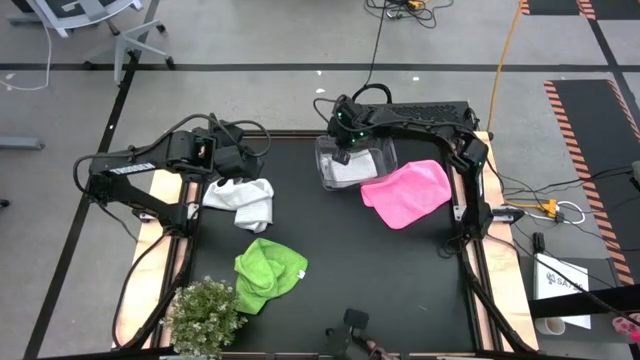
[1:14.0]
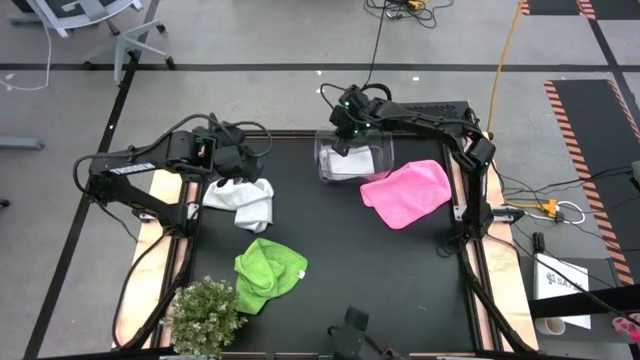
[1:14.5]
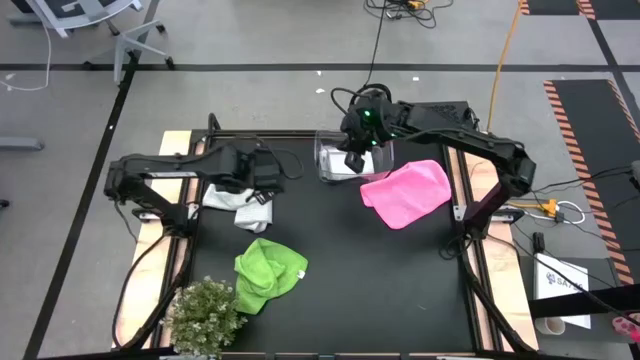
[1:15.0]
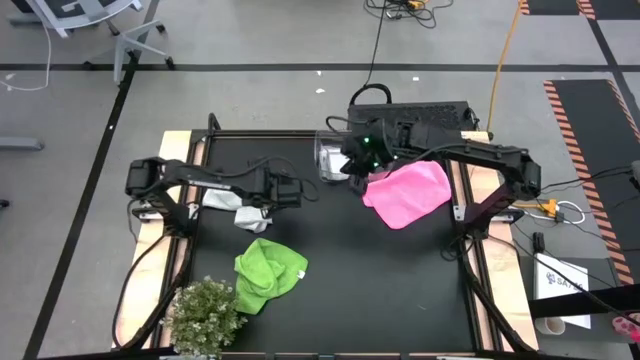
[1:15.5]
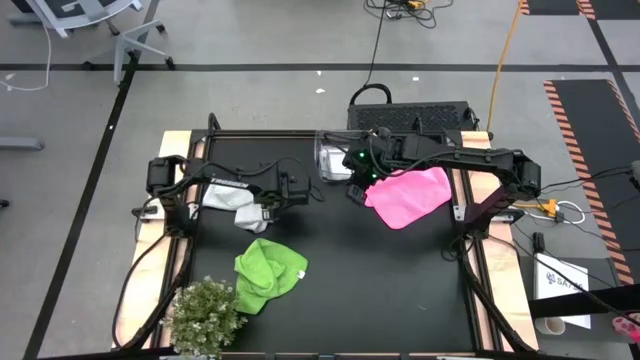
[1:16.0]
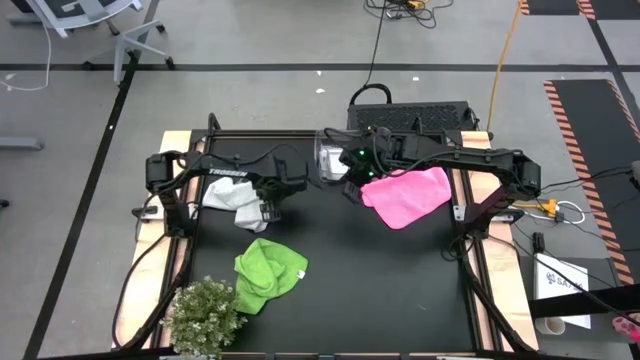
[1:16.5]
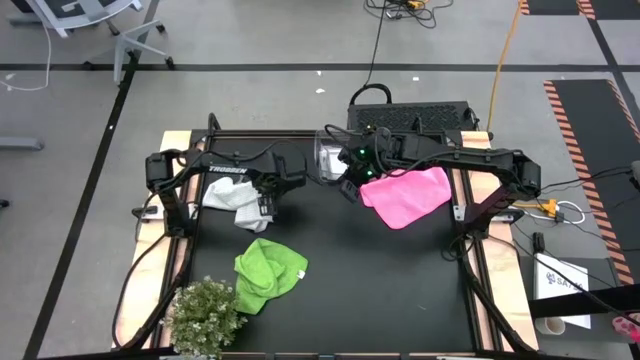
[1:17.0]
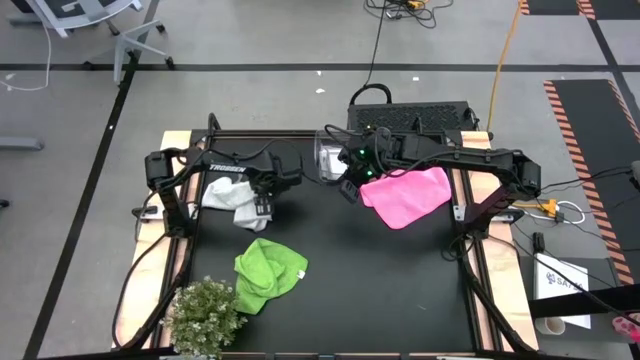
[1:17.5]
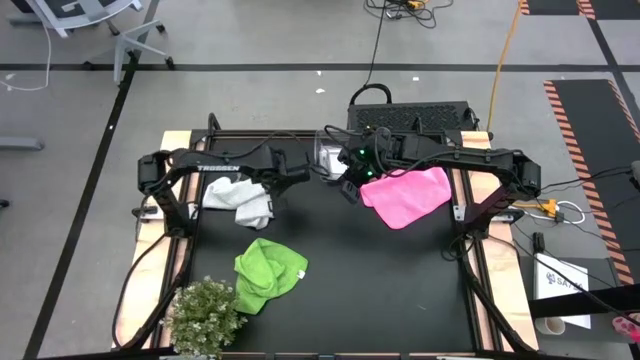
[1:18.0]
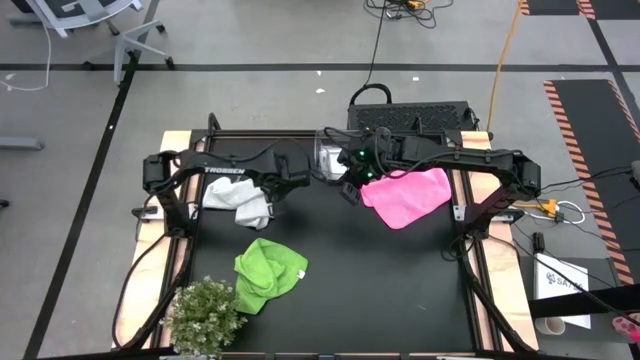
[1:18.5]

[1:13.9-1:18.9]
Task: Fold microfiber towels
Fold the gray microfiber cloth

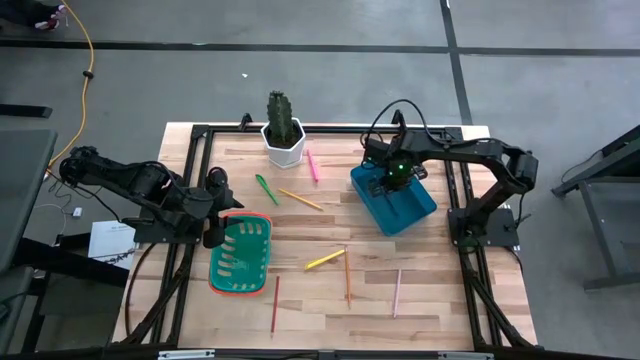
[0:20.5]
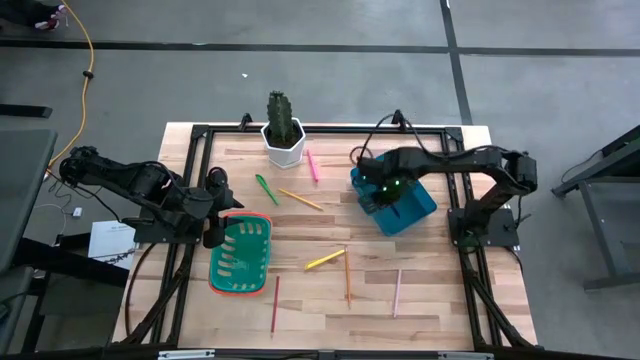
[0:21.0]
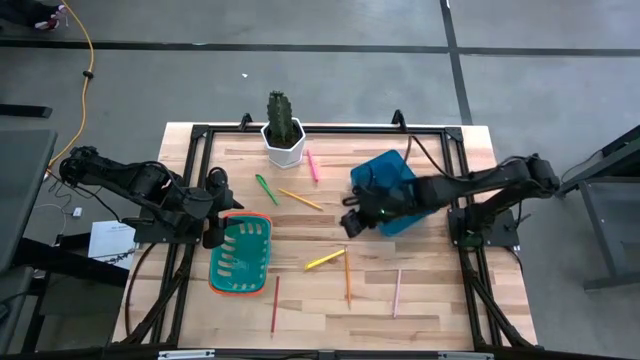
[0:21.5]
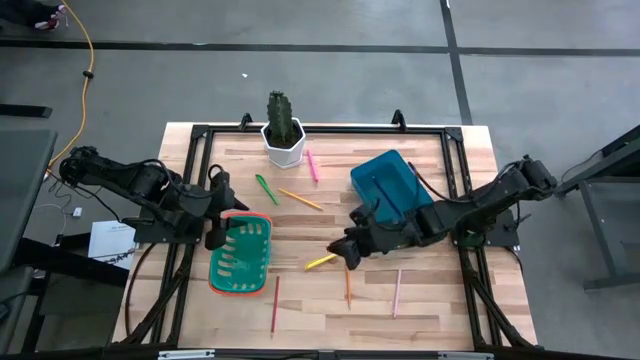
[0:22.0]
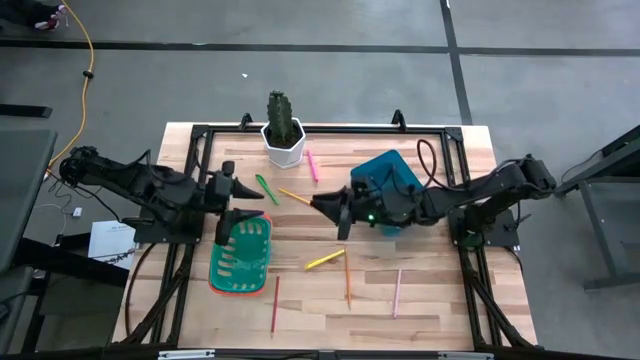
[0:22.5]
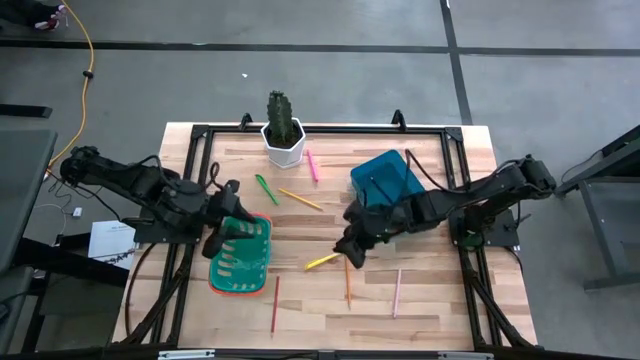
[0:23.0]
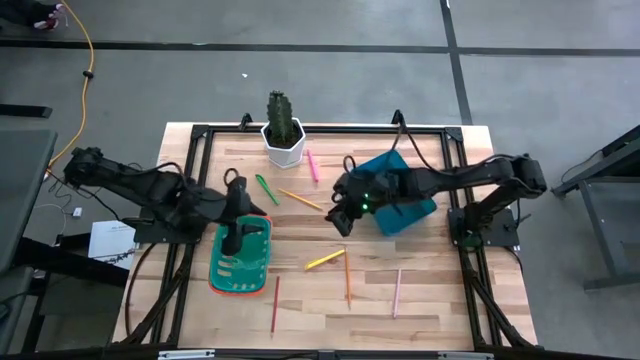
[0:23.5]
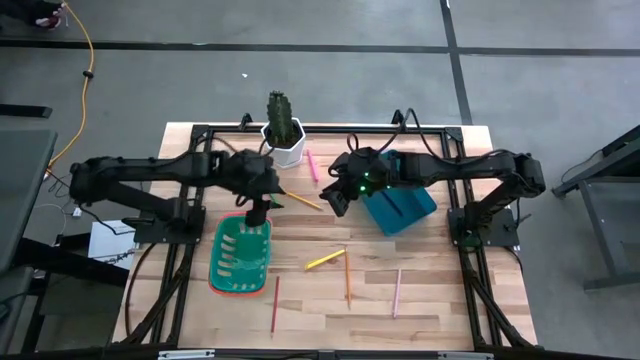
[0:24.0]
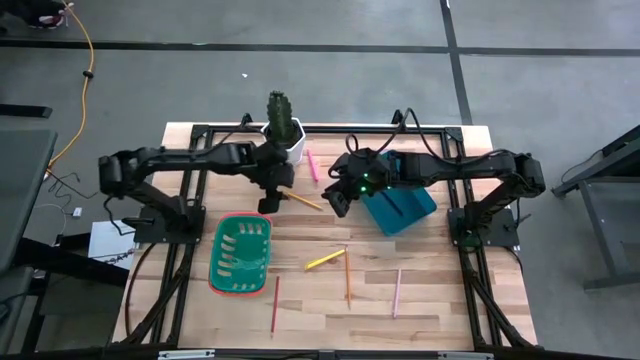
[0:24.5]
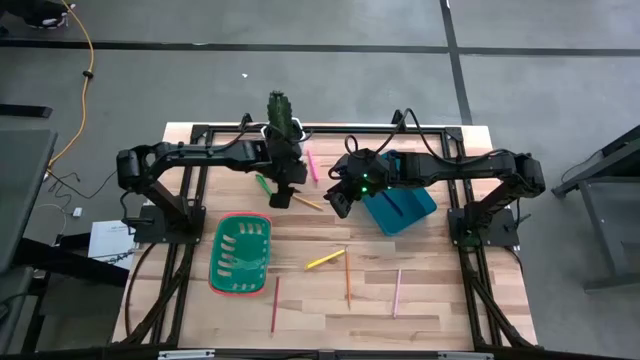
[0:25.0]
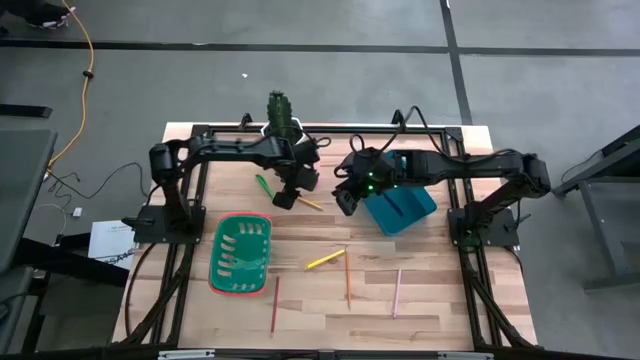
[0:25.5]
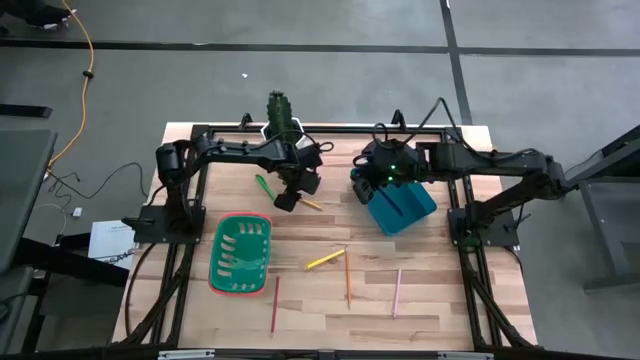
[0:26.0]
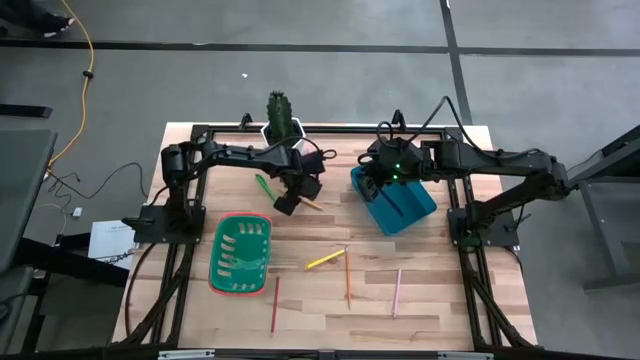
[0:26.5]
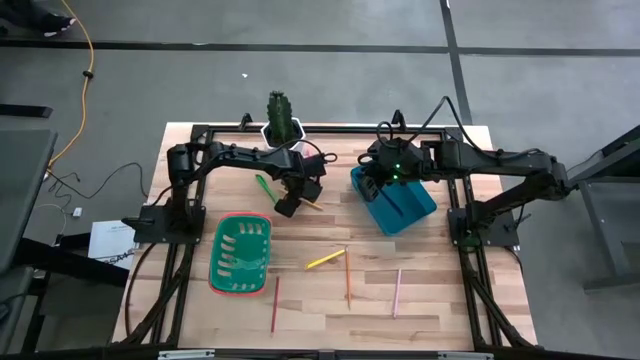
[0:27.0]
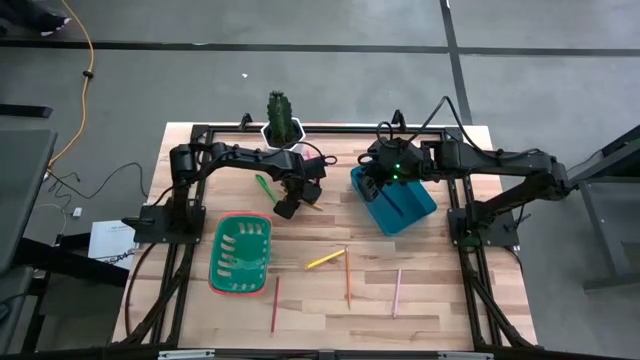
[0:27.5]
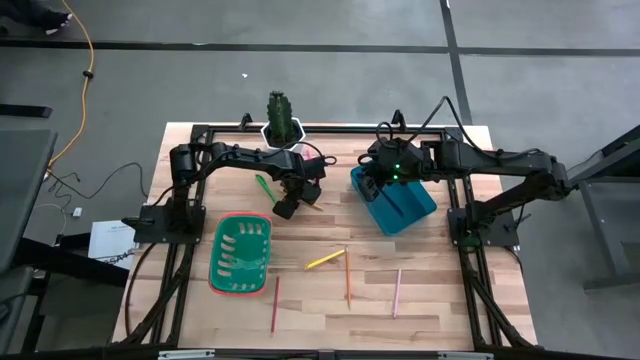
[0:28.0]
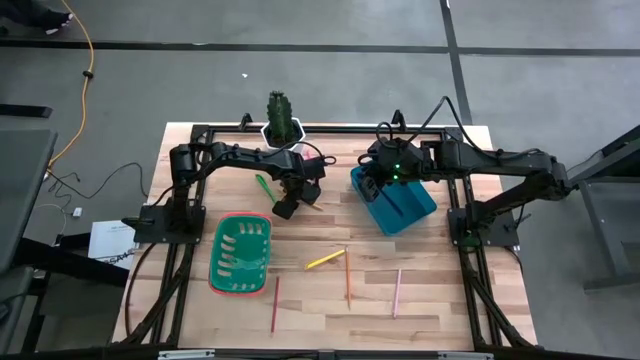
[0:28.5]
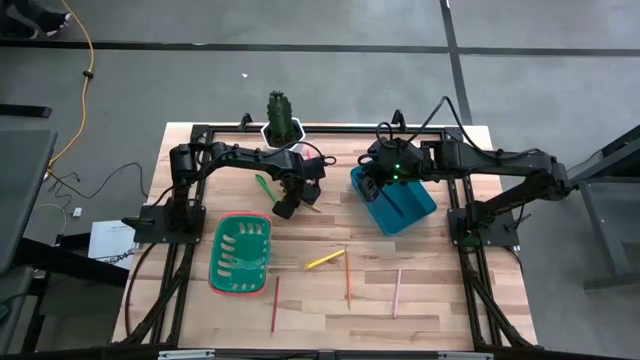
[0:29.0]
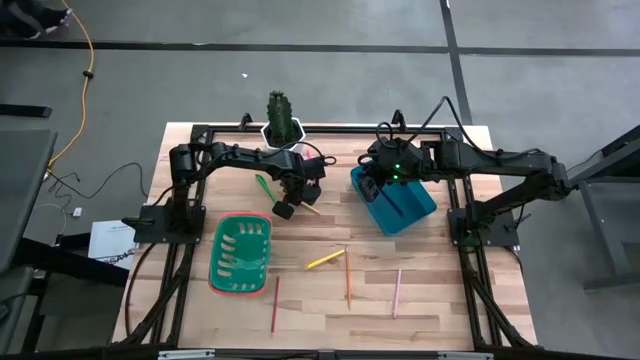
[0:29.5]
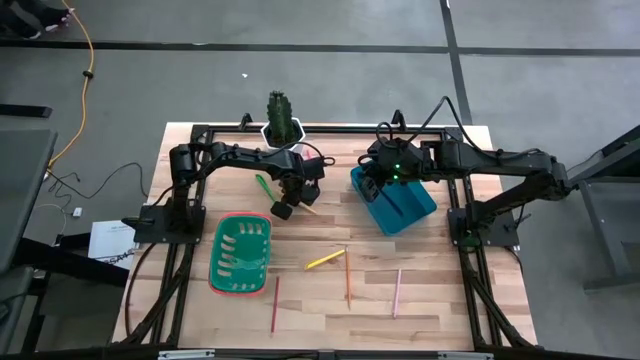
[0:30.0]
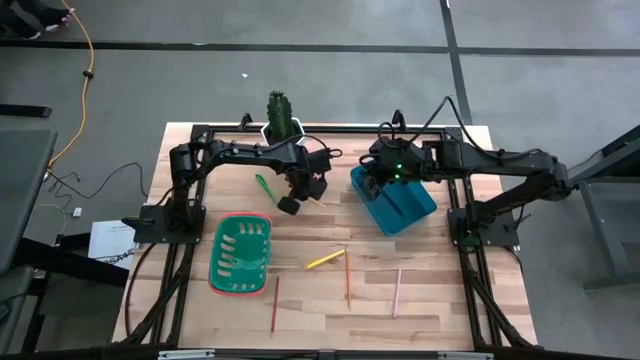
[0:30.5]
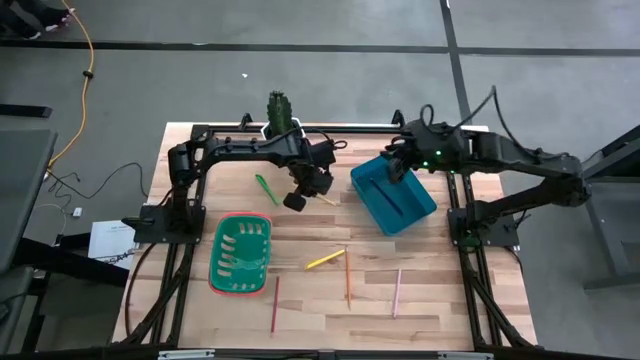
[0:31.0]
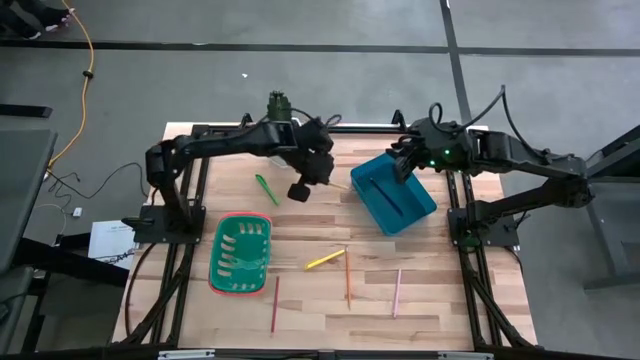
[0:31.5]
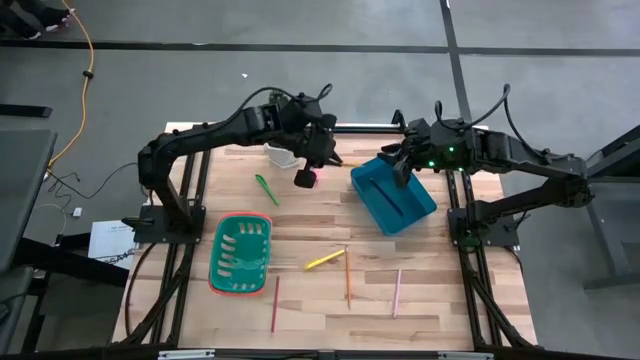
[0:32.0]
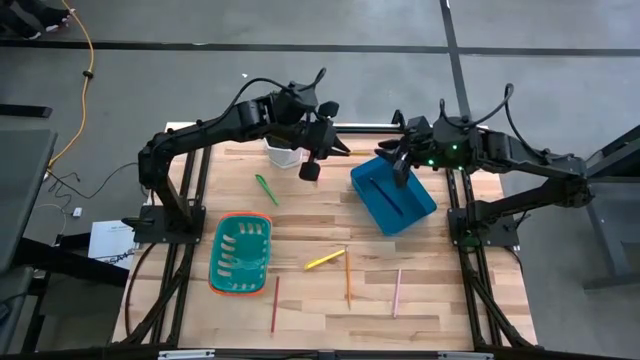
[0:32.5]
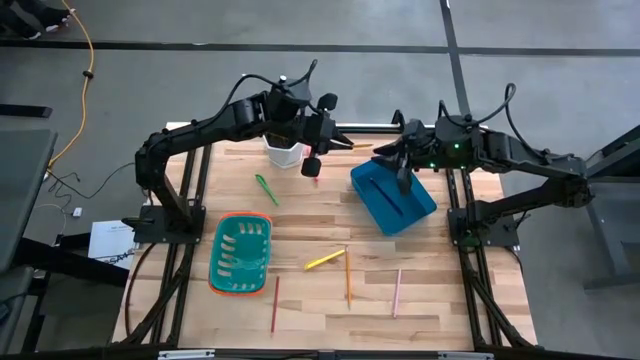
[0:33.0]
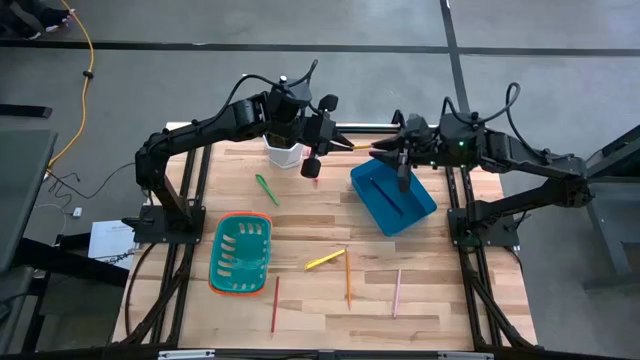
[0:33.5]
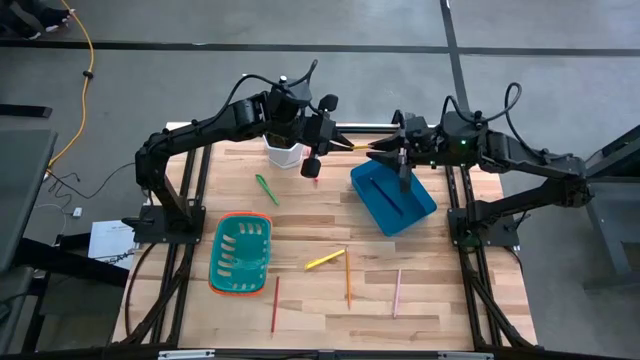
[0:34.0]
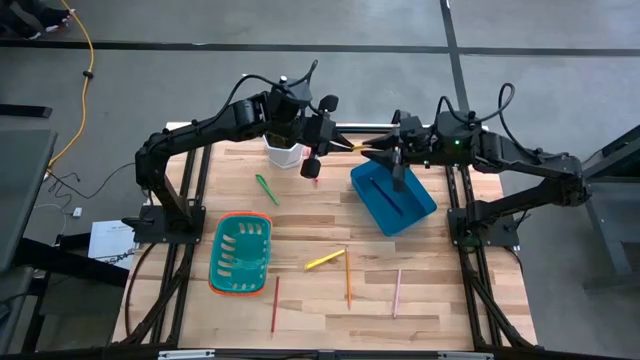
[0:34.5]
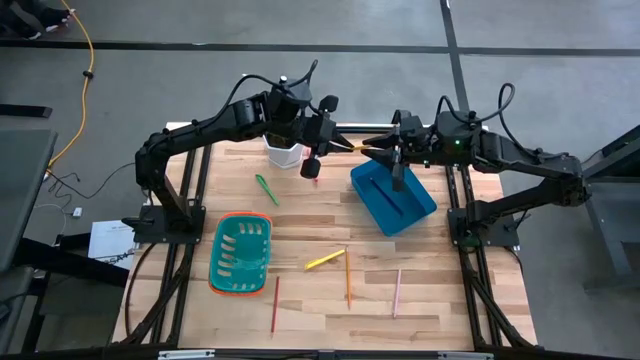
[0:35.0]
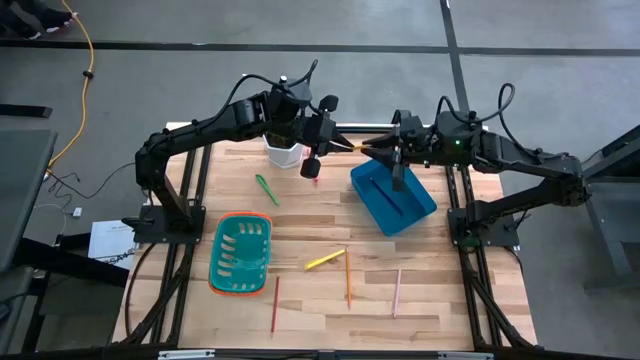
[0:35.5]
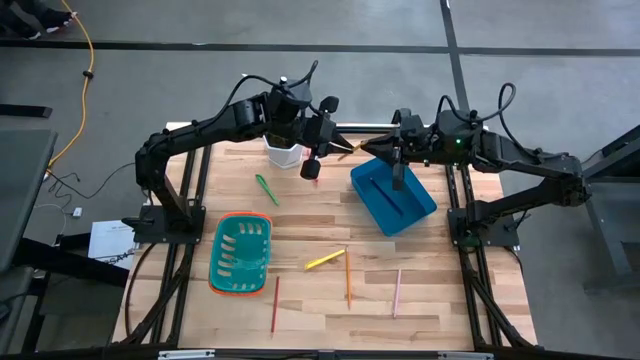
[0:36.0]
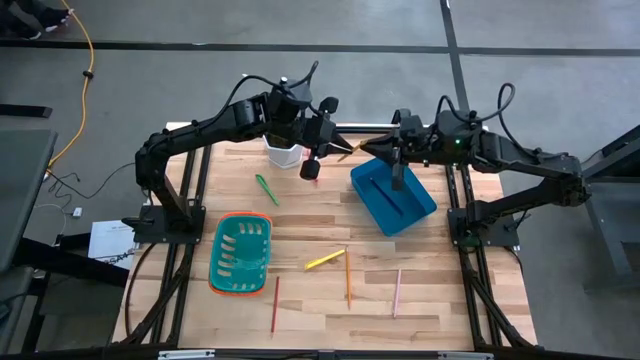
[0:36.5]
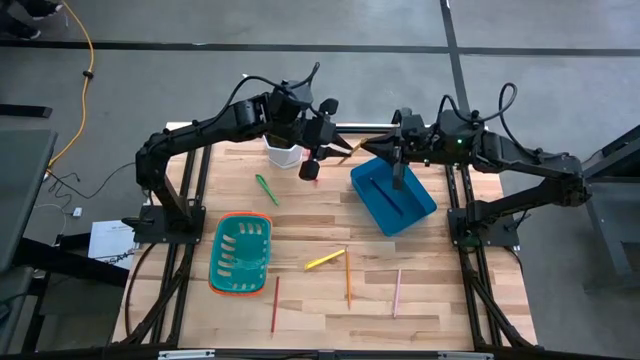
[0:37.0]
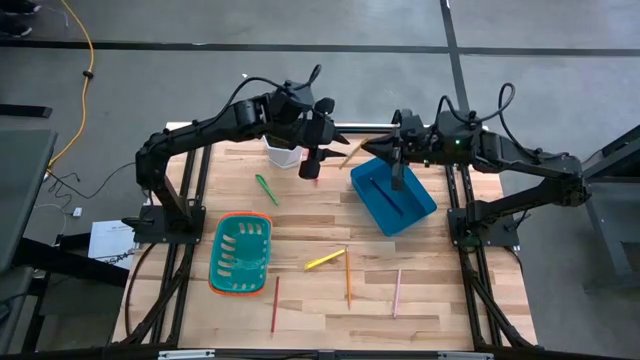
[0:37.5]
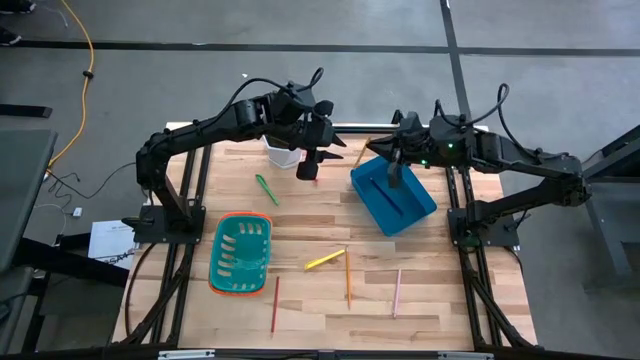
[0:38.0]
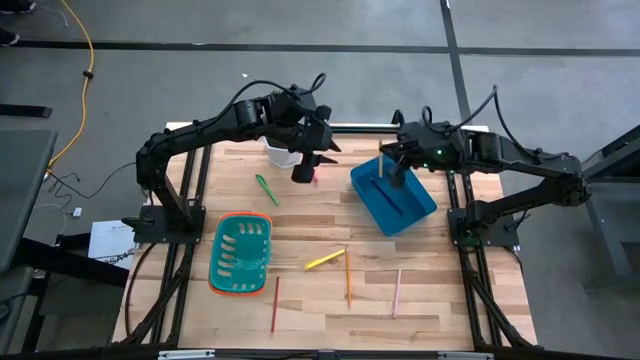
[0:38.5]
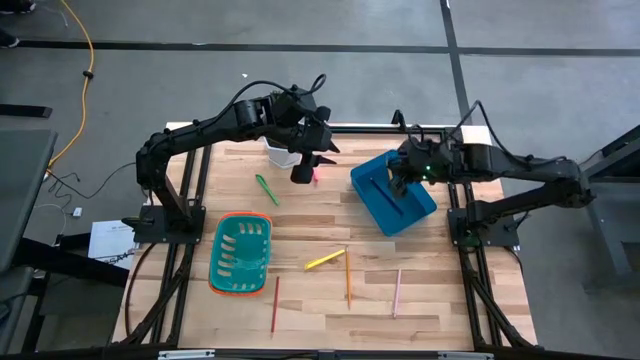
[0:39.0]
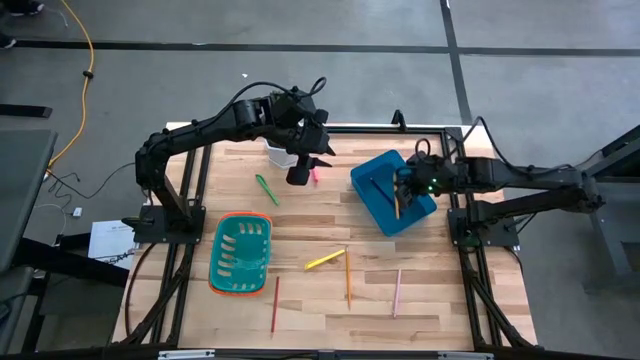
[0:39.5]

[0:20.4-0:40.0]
Task: Sort pens & pencils
Put the yellow pencil into the blue bin
